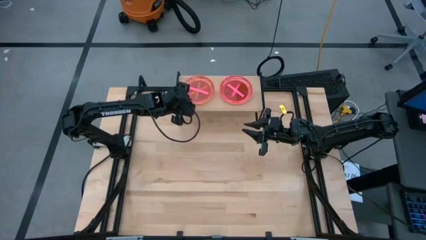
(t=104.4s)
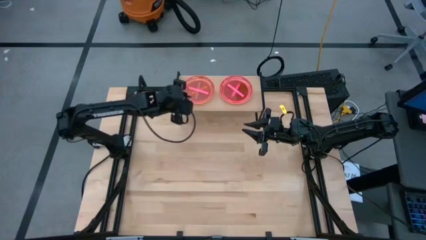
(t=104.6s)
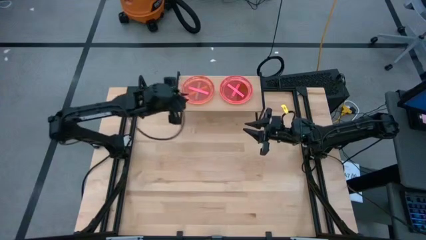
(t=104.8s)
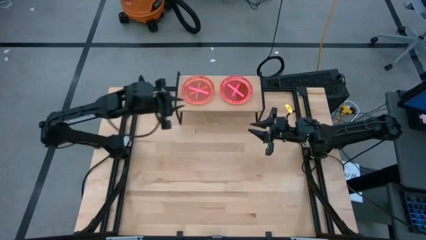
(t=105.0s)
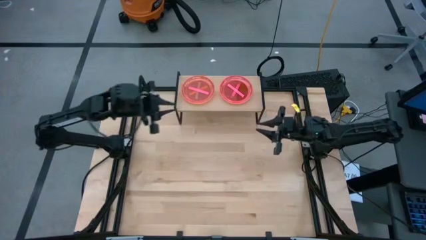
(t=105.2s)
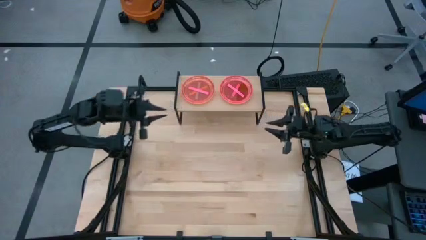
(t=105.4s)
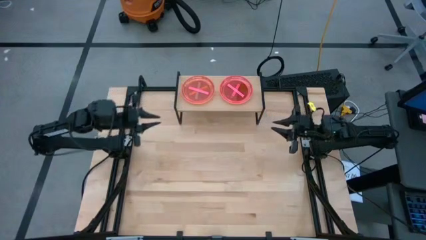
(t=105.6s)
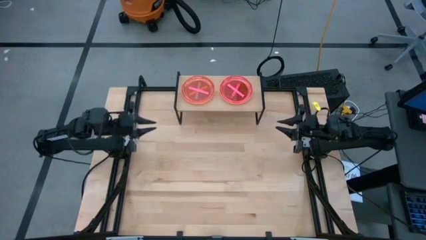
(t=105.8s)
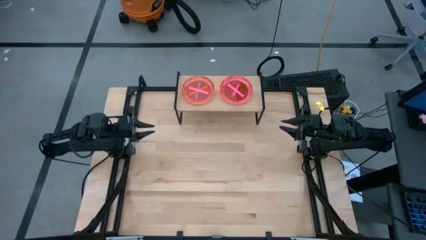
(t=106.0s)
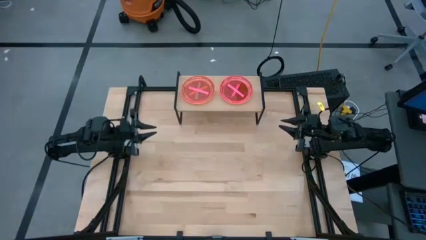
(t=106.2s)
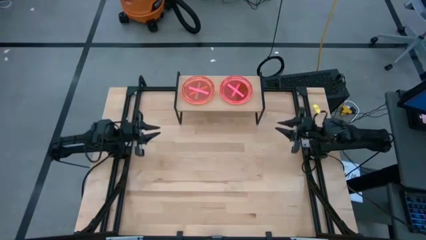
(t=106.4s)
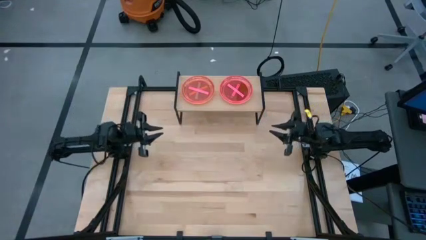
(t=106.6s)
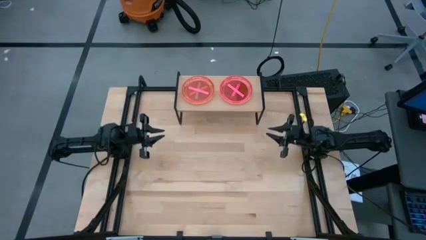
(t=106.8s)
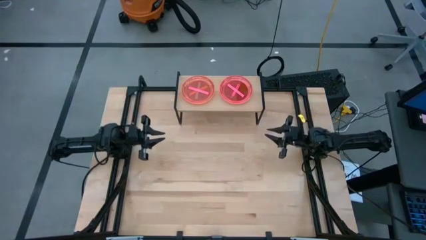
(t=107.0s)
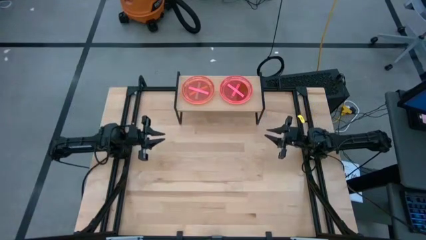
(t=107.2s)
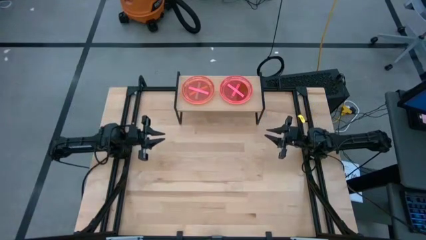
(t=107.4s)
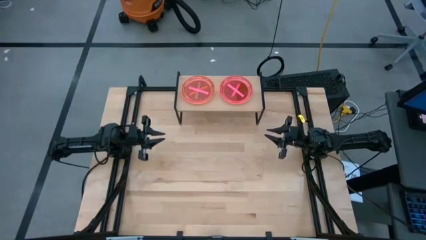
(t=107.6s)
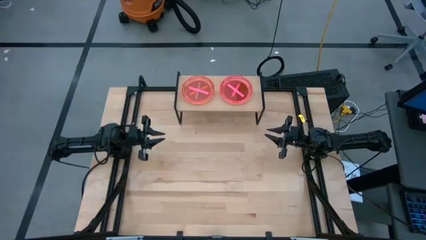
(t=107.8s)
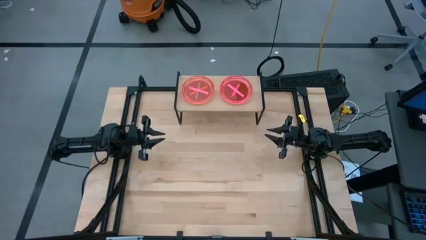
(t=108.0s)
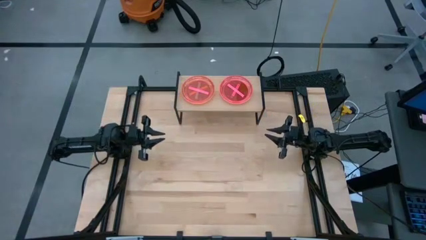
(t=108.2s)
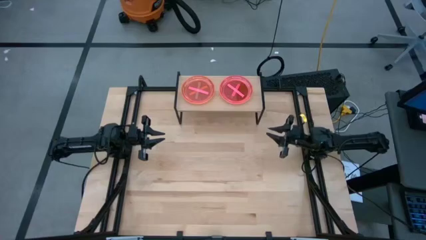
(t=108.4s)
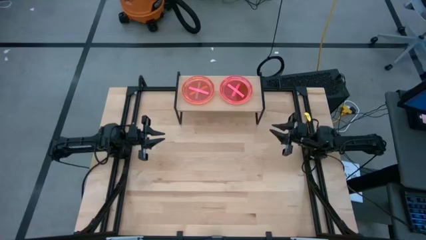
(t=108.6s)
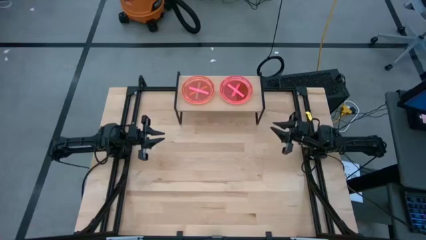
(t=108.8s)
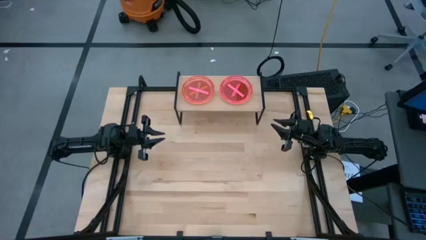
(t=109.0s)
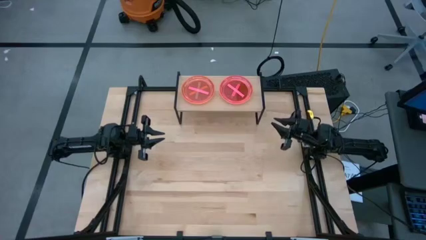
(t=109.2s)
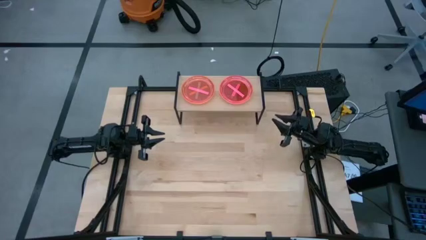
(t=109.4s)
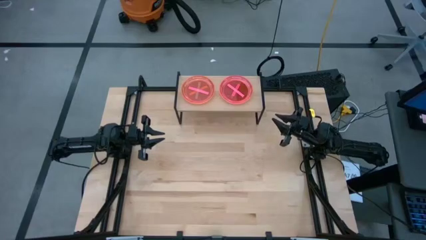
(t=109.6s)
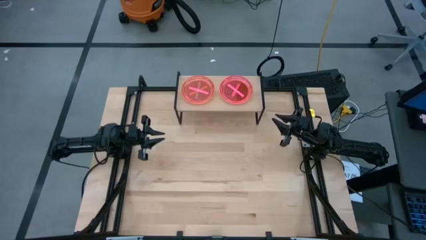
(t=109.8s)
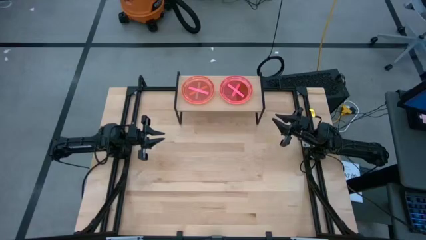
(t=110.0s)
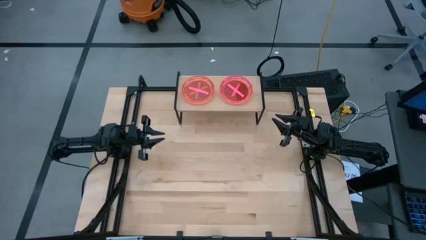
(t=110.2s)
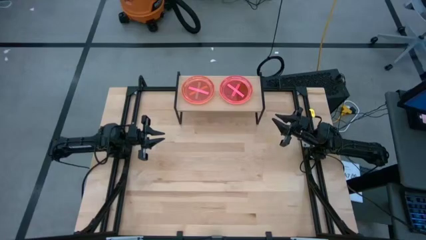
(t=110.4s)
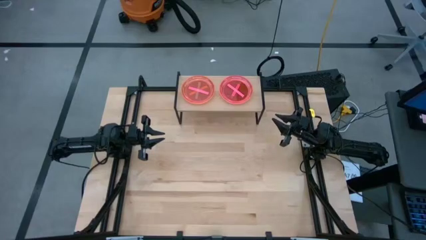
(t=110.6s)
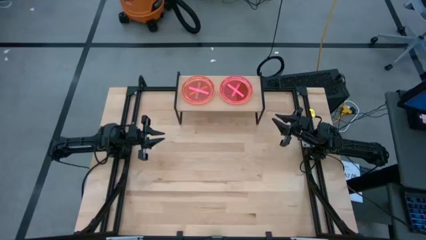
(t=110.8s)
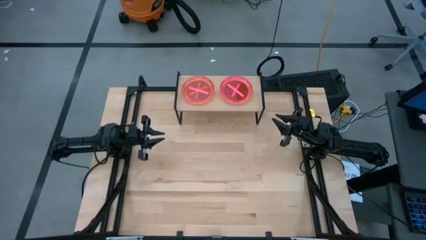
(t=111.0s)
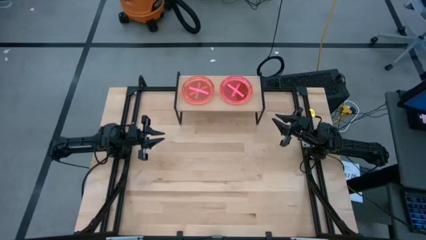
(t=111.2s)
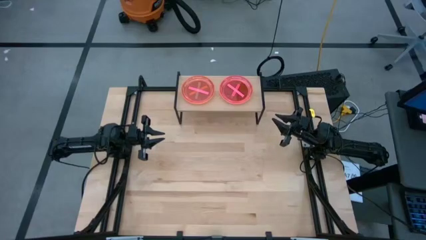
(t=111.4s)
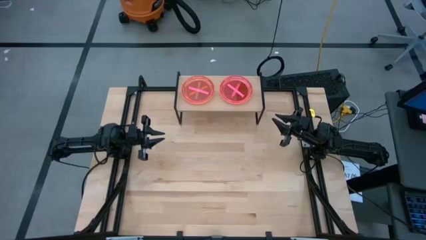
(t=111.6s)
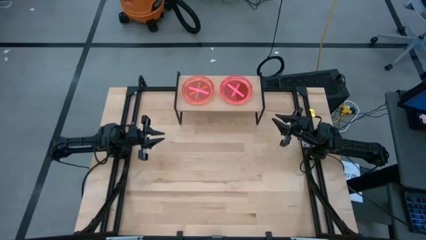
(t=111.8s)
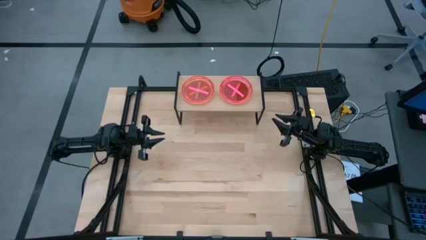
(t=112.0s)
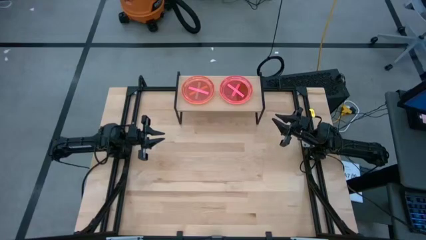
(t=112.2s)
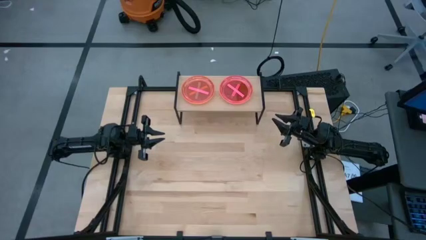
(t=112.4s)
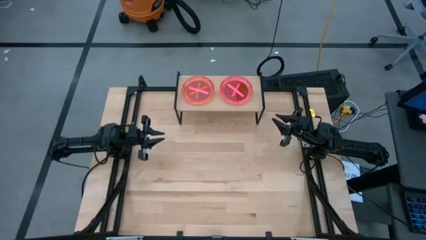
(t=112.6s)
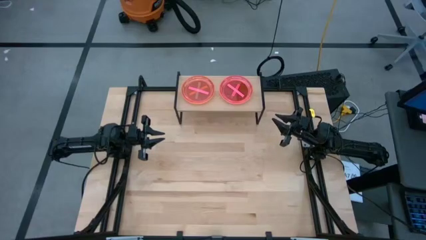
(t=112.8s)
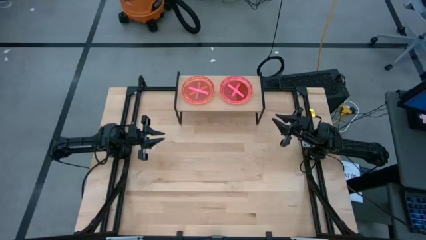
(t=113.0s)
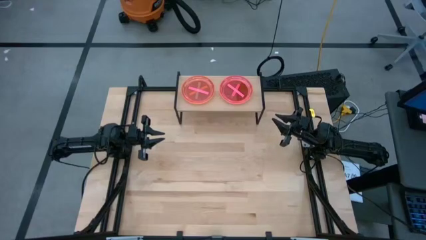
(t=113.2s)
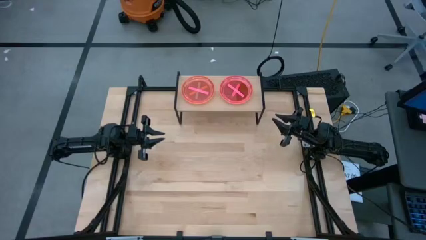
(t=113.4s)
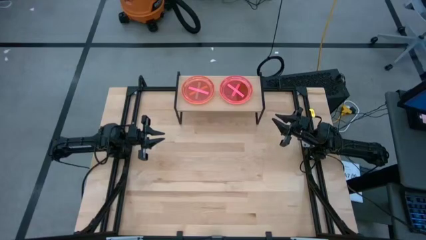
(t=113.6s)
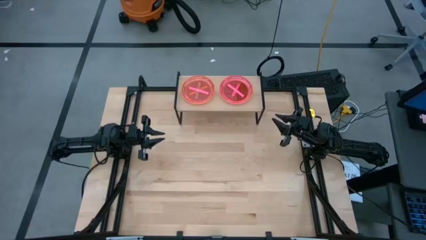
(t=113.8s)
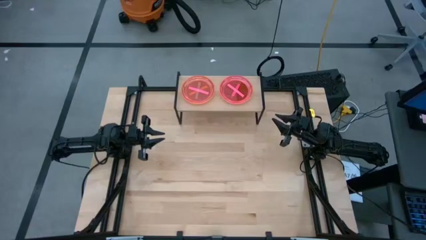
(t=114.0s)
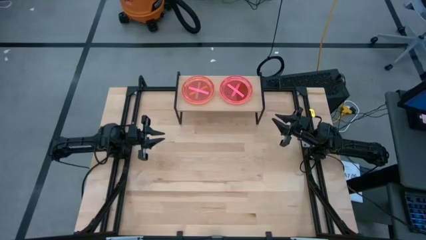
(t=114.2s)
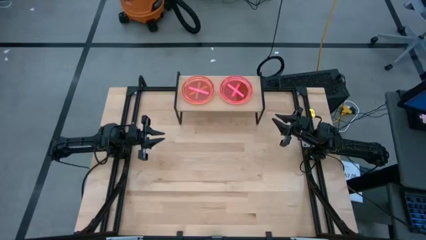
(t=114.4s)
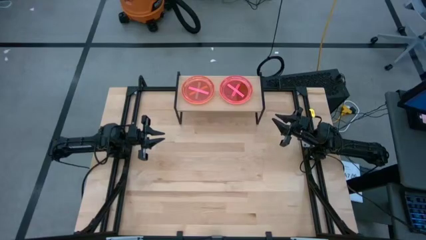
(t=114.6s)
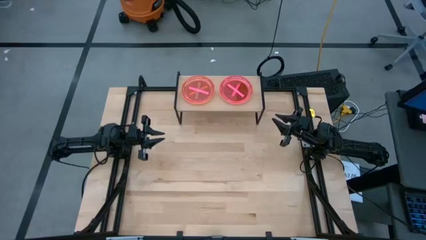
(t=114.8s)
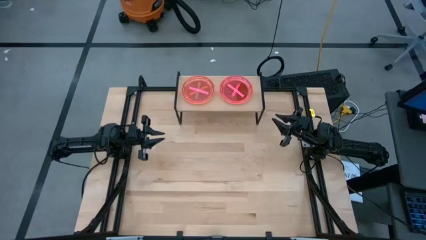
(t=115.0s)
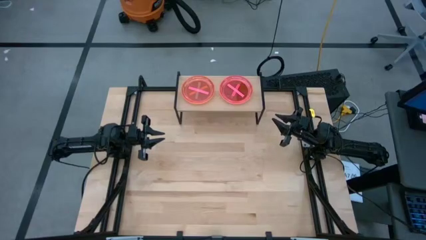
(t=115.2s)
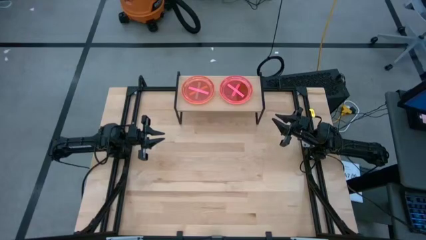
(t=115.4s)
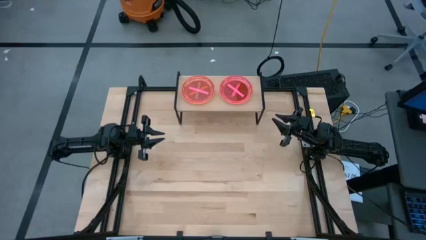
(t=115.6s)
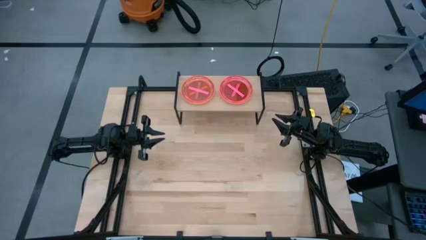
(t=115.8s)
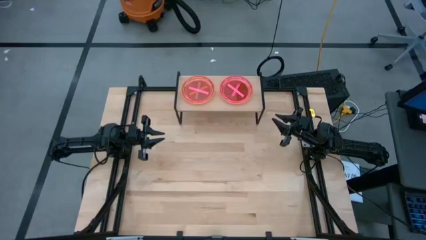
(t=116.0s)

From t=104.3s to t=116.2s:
Task: Place and stack plates onto a shelf
Return to Home Position
